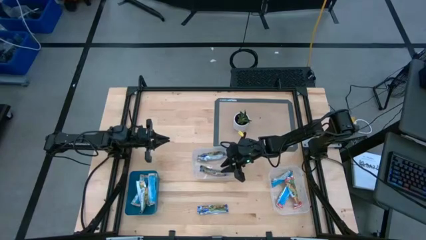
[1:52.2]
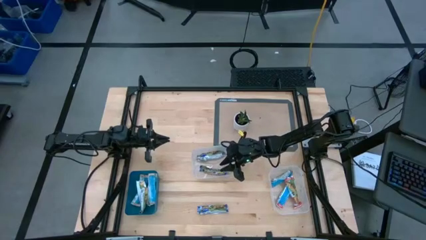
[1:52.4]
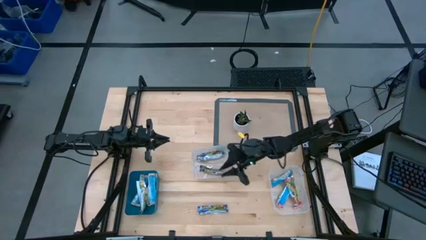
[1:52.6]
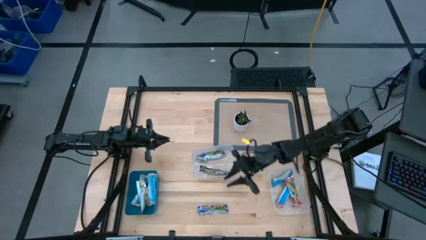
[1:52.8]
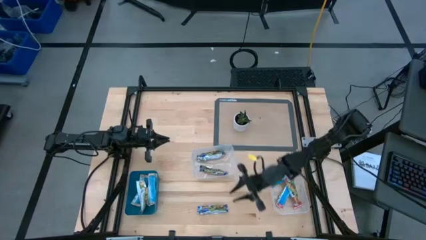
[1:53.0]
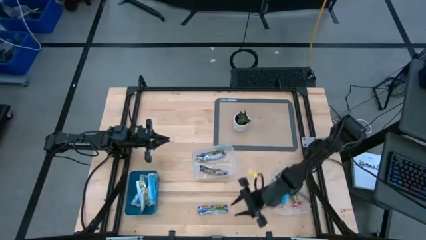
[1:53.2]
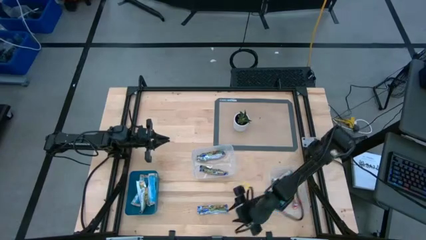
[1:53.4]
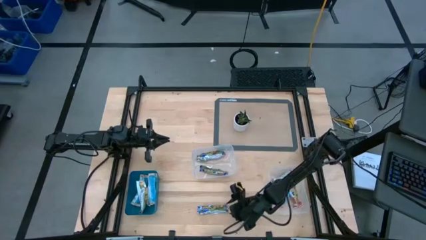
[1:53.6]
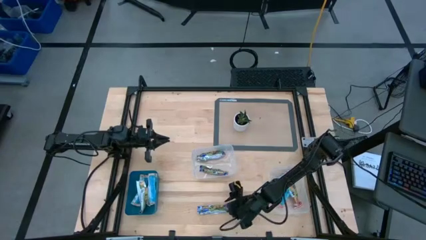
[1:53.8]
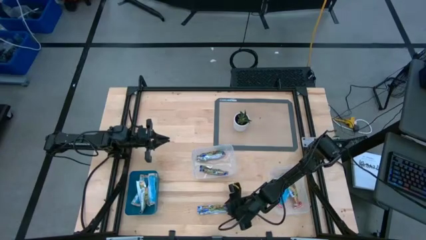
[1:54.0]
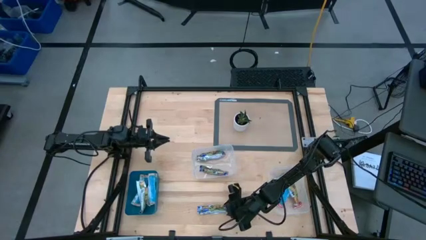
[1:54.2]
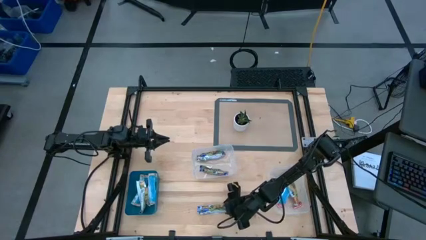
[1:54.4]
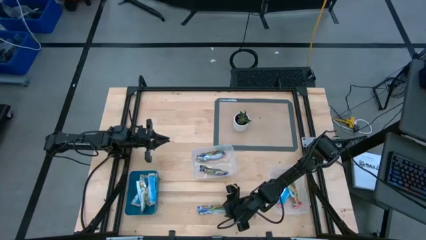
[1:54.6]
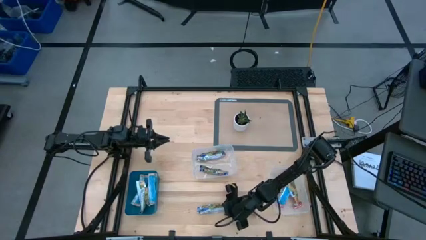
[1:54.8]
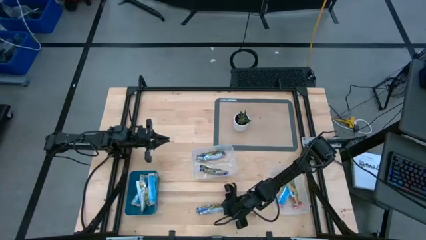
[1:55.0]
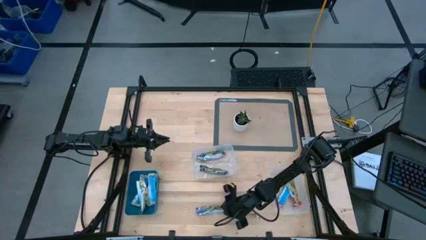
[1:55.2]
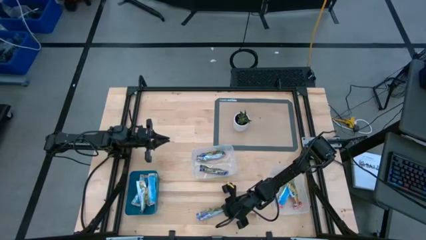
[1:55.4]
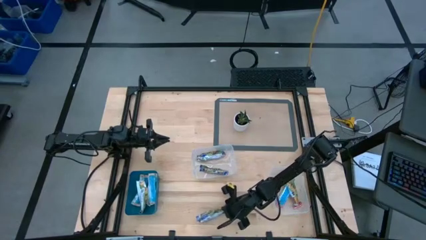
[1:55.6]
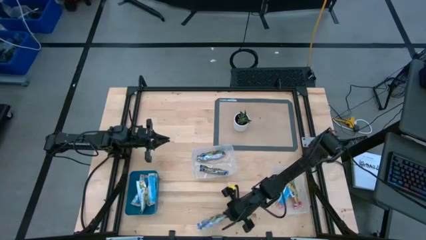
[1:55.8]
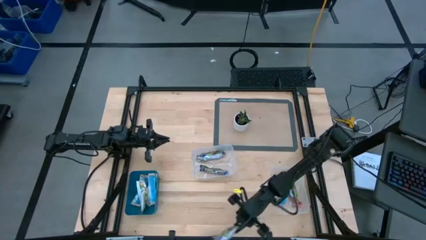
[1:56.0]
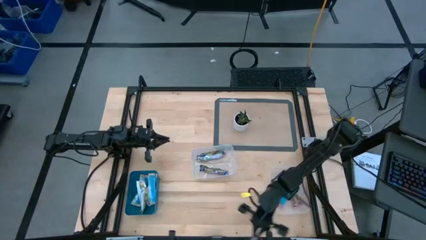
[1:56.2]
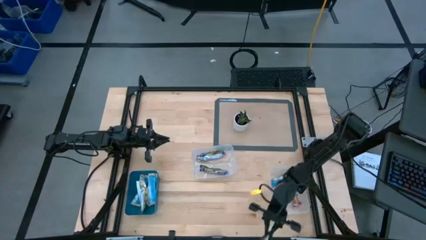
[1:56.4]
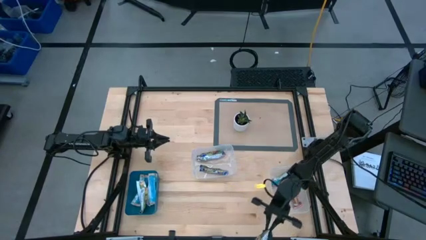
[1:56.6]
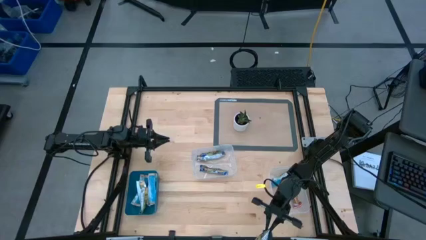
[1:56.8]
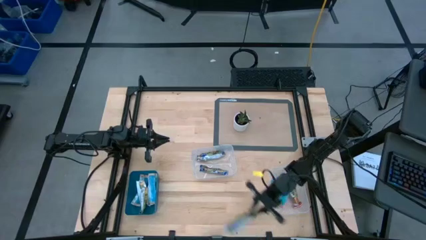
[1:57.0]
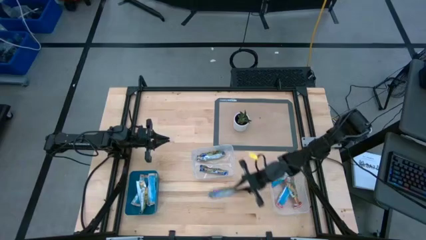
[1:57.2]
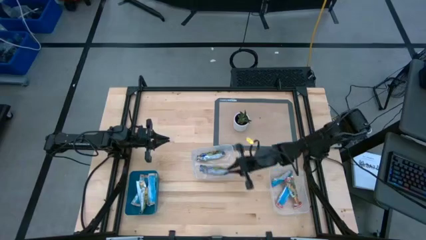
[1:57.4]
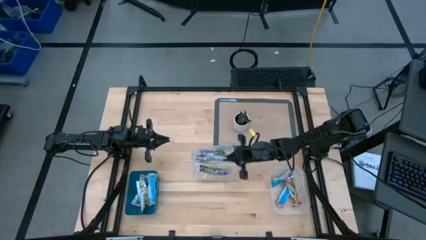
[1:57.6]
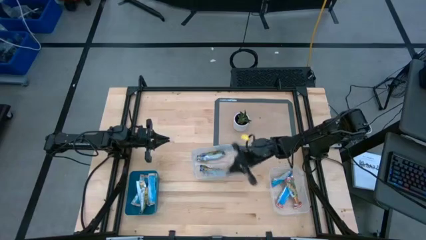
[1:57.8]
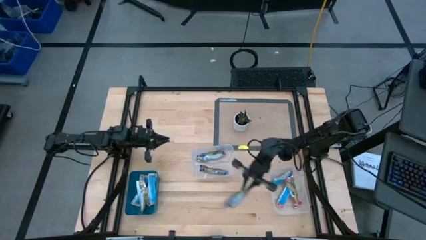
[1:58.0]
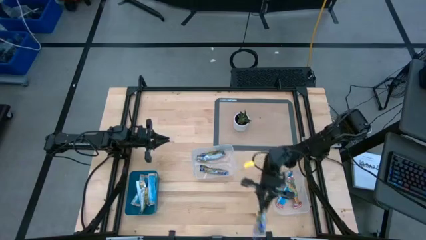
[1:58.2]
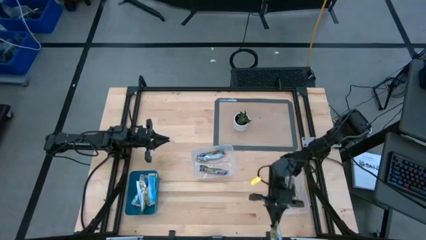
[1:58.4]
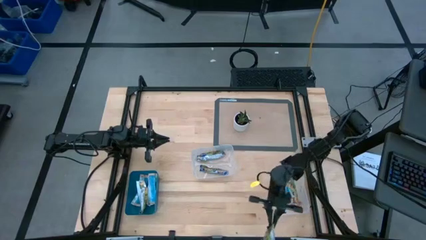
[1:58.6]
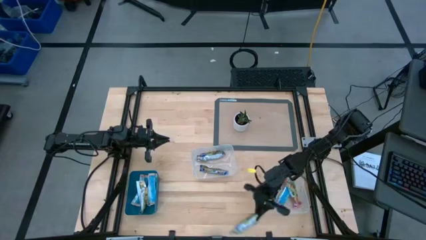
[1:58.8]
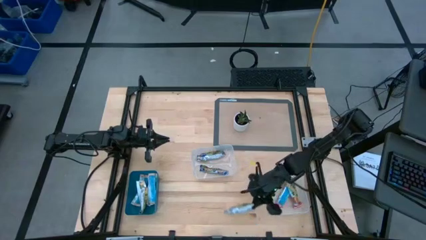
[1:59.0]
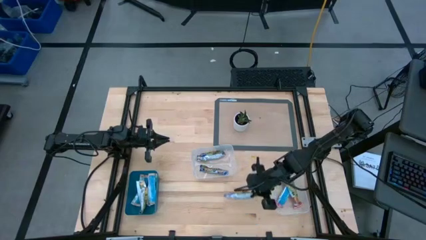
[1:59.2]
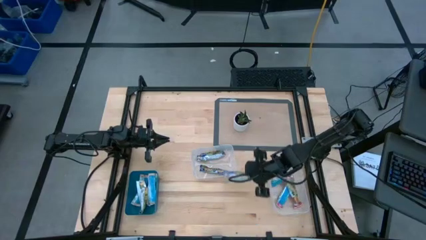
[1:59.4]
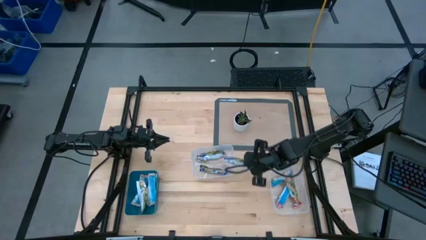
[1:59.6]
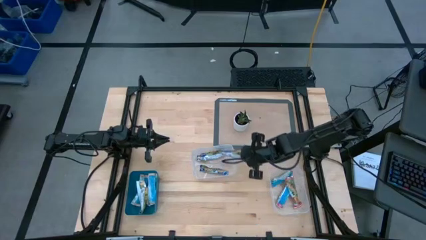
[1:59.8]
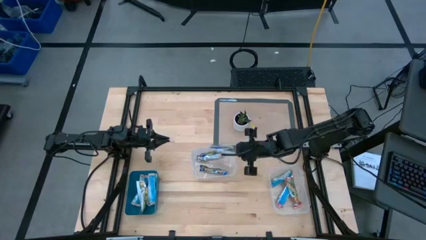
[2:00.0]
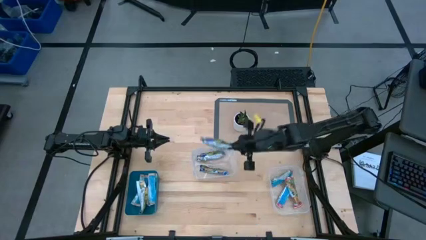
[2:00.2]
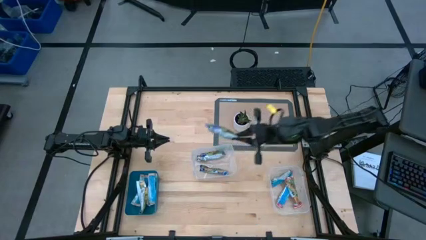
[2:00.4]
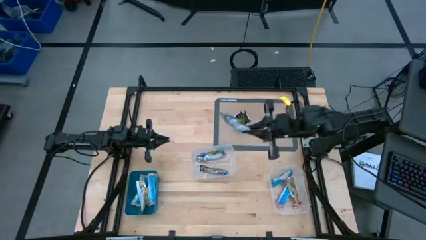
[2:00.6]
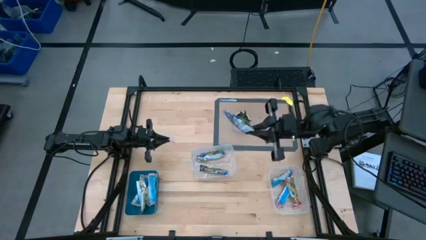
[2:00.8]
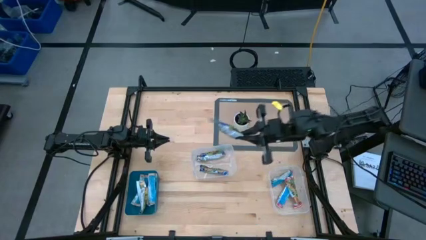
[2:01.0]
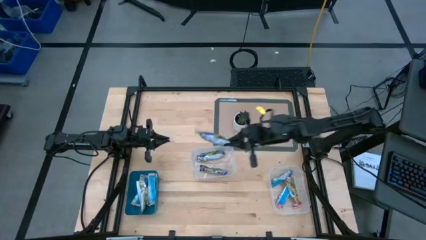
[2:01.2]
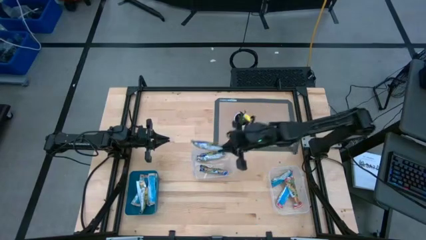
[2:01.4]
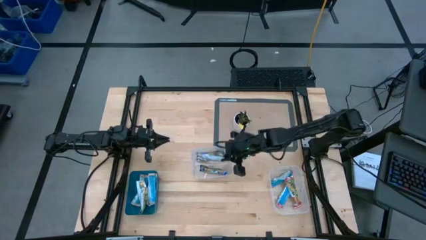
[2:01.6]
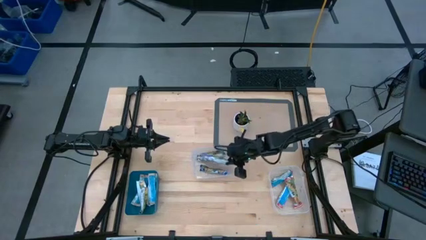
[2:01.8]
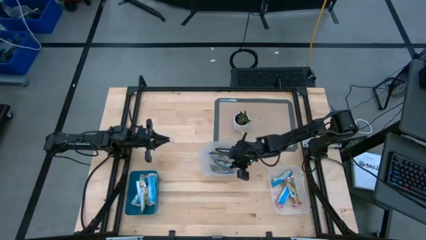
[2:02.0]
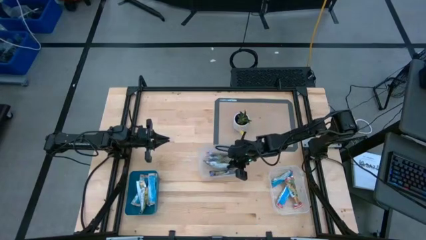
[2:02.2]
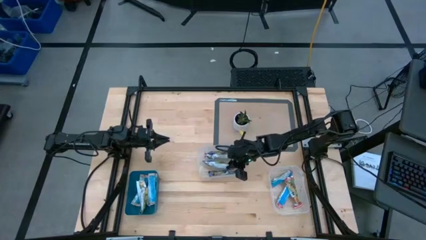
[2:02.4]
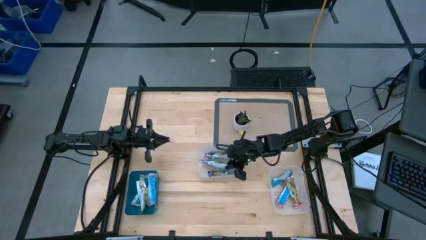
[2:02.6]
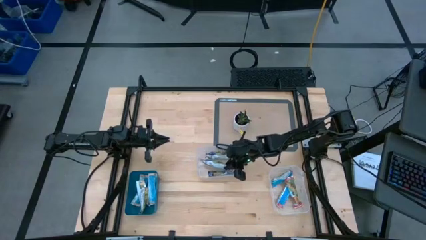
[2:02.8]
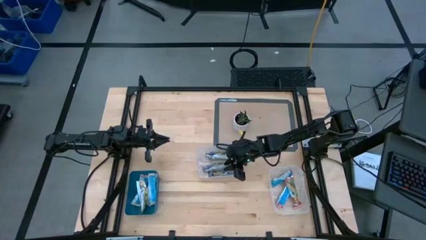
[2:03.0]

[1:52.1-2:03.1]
Task: Pick and place Granola Bars by type
Put the blue granola bar into the left transparent bin

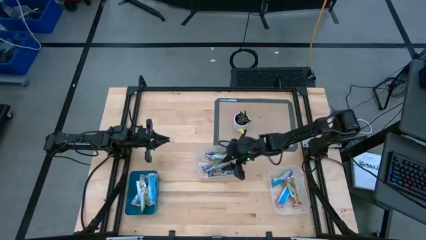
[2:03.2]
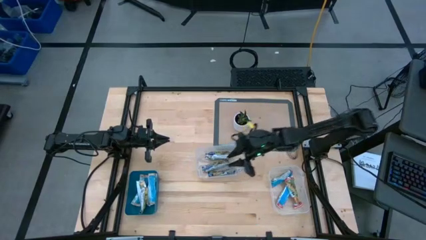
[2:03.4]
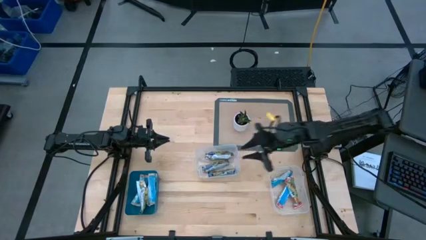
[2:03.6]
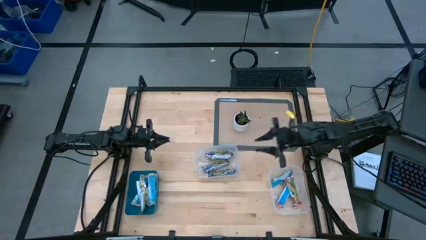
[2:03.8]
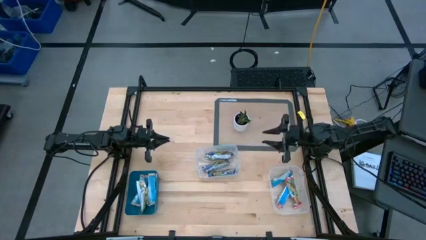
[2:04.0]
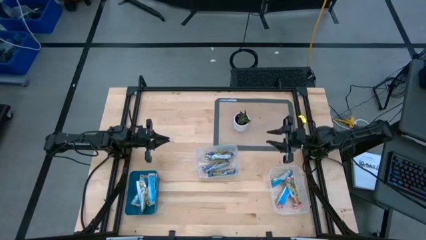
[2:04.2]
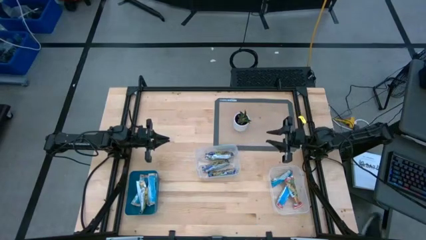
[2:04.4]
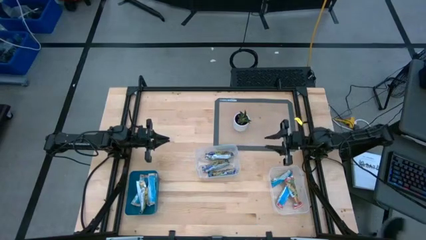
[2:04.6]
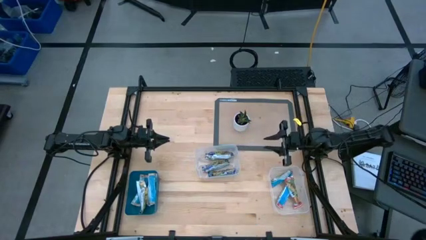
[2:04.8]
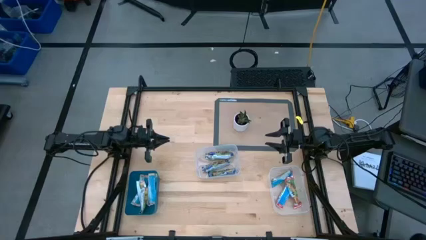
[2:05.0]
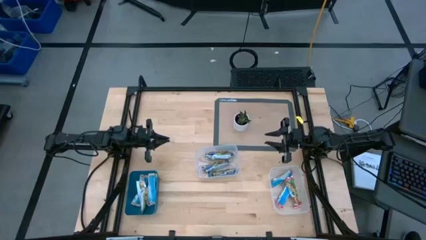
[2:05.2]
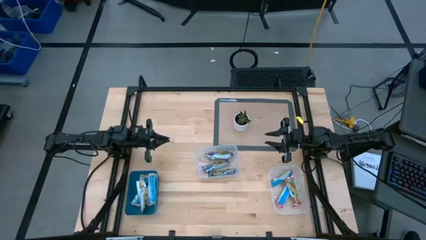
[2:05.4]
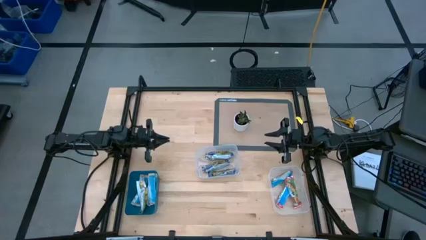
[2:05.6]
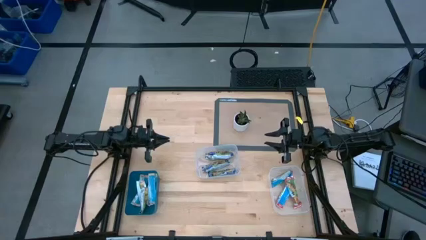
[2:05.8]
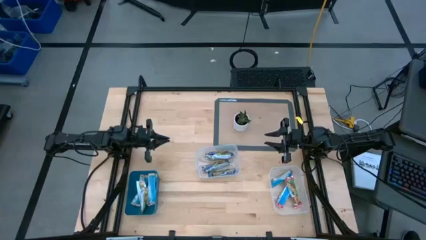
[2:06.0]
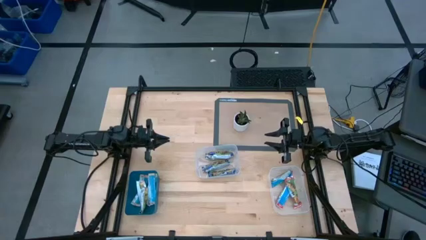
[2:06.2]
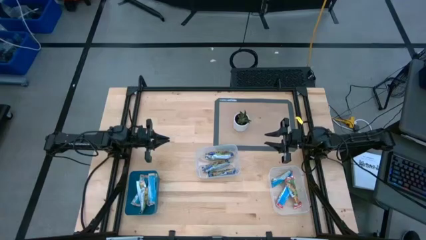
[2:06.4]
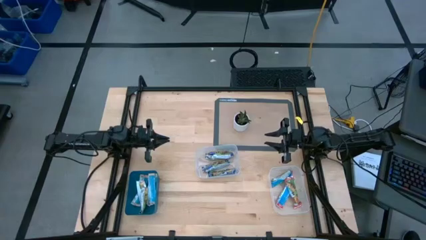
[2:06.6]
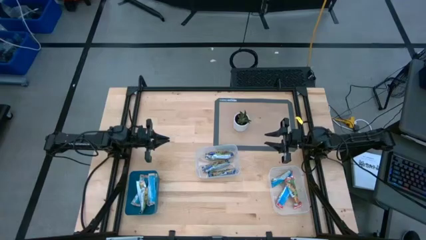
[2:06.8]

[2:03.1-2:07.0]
Return to Home Position
